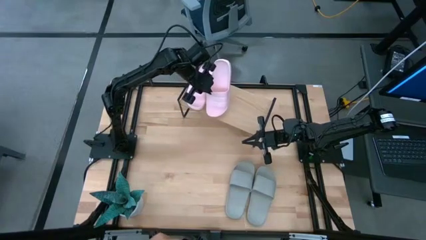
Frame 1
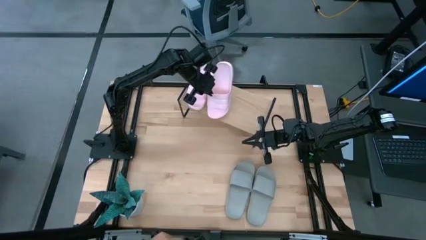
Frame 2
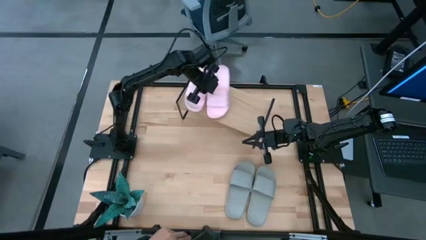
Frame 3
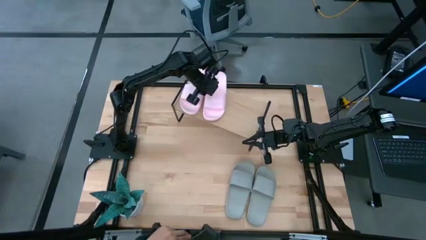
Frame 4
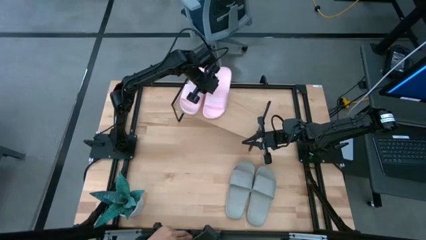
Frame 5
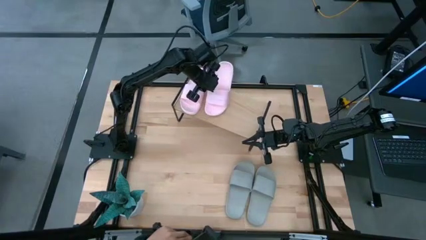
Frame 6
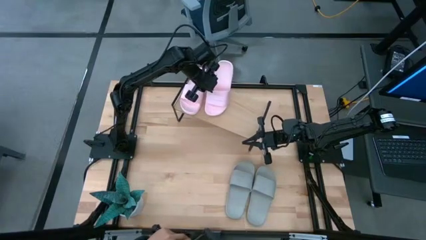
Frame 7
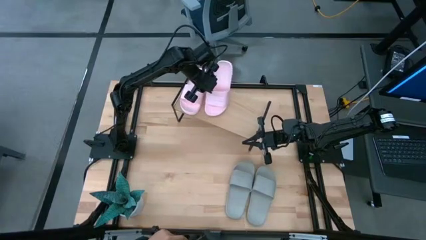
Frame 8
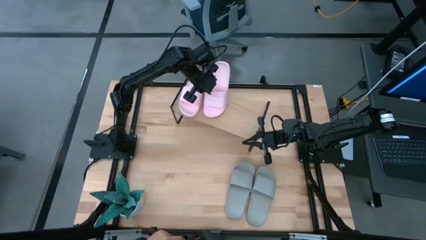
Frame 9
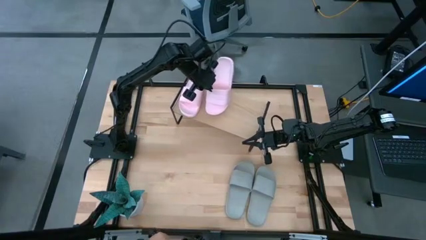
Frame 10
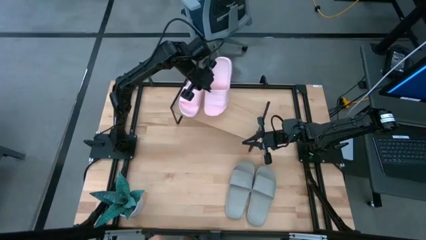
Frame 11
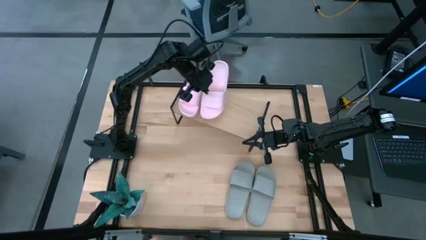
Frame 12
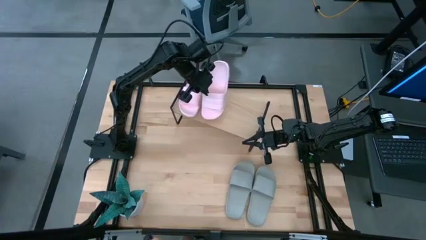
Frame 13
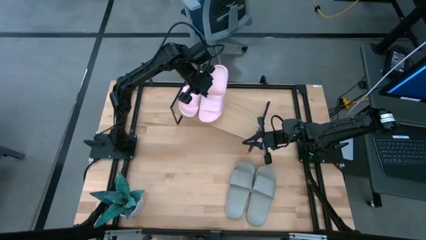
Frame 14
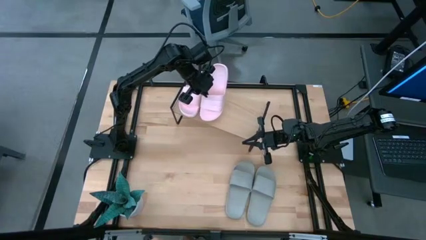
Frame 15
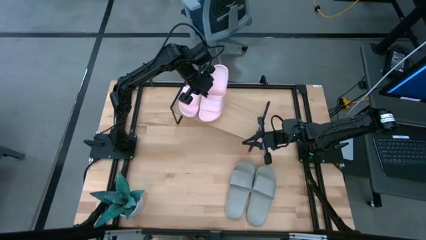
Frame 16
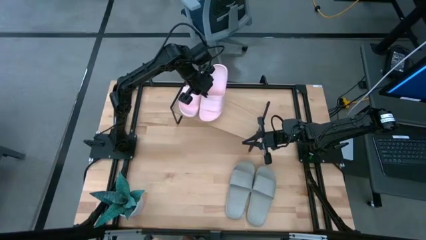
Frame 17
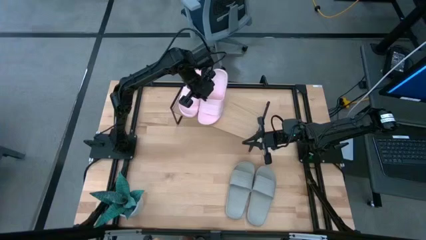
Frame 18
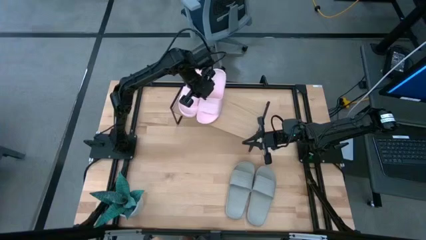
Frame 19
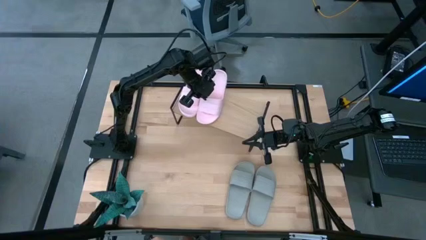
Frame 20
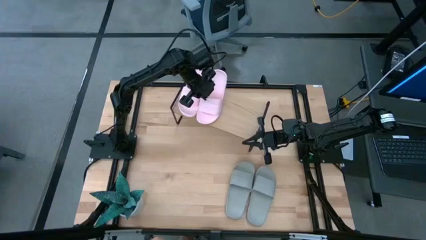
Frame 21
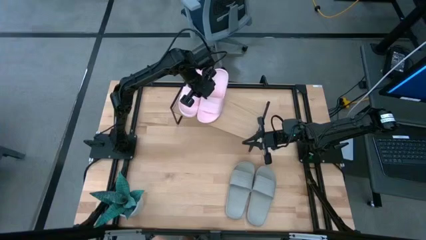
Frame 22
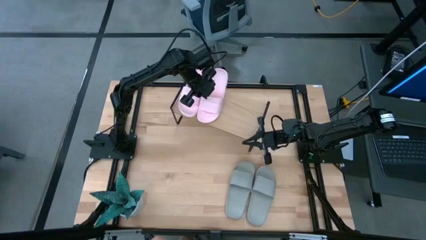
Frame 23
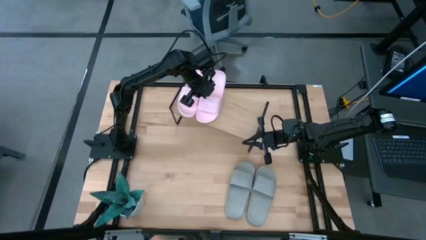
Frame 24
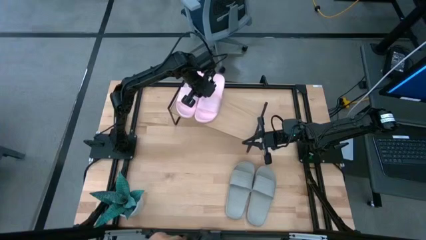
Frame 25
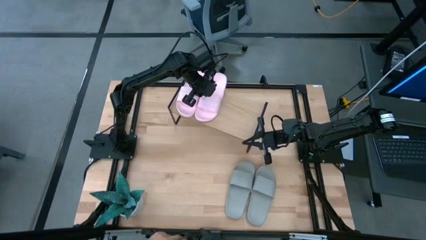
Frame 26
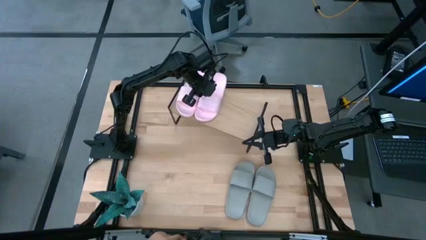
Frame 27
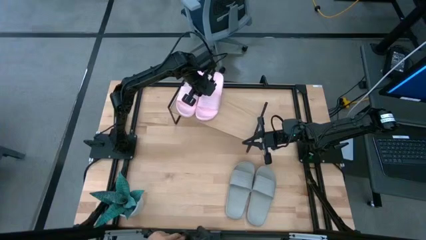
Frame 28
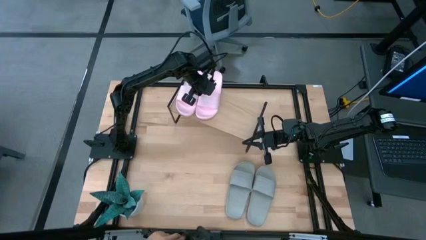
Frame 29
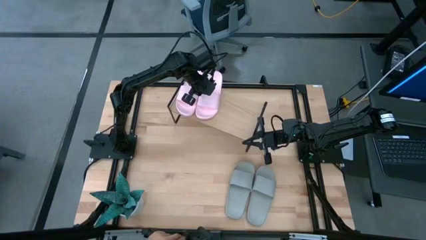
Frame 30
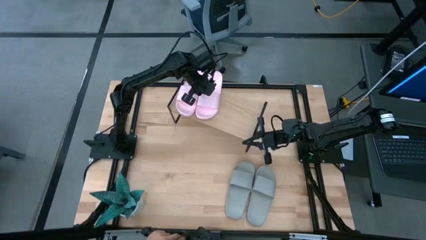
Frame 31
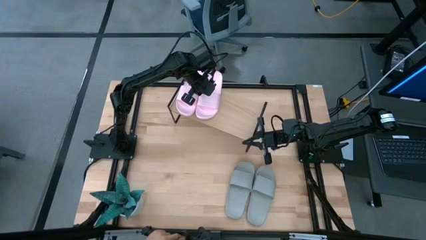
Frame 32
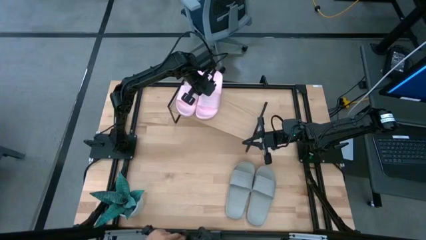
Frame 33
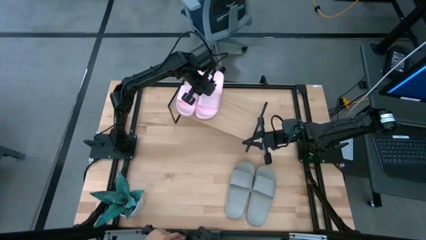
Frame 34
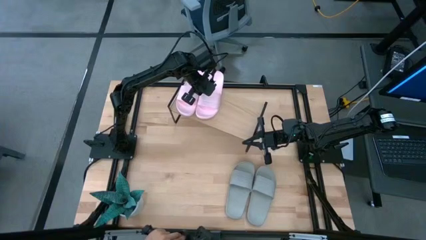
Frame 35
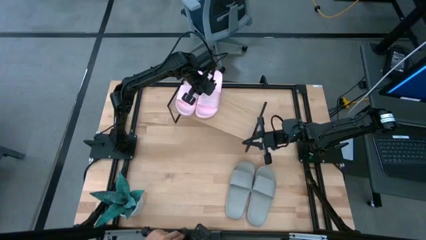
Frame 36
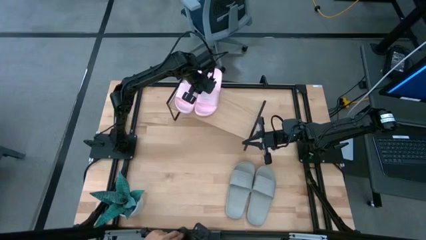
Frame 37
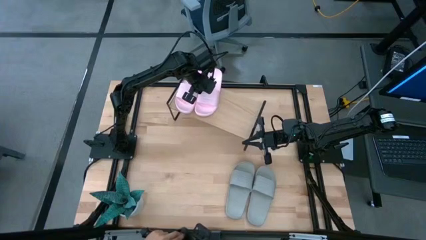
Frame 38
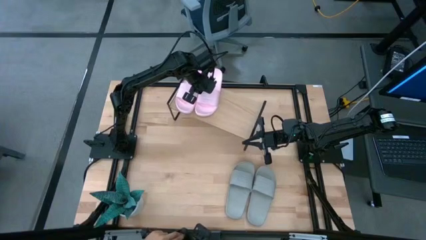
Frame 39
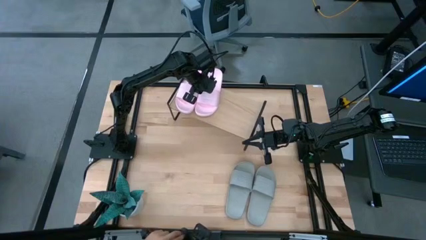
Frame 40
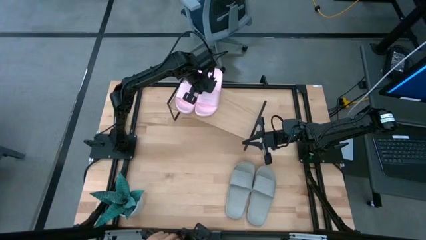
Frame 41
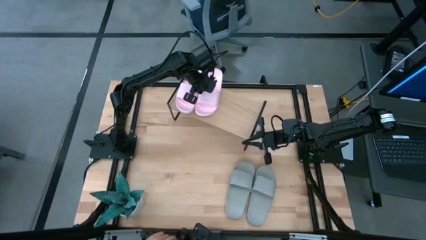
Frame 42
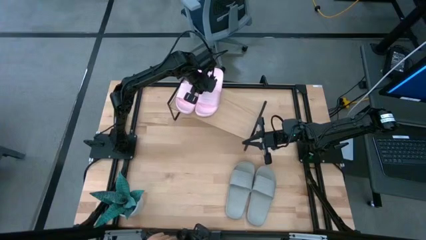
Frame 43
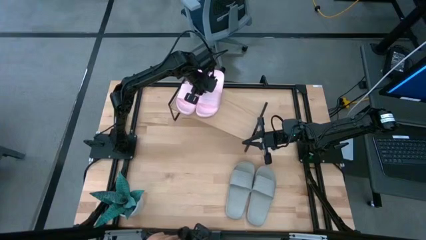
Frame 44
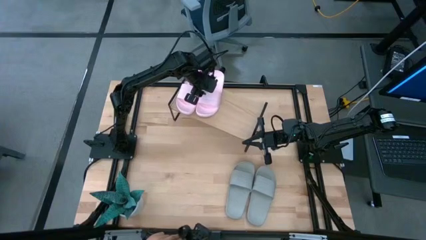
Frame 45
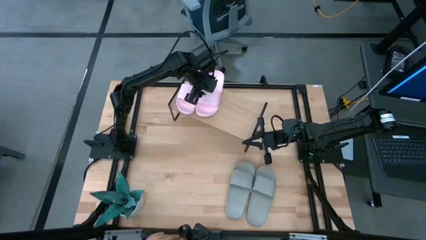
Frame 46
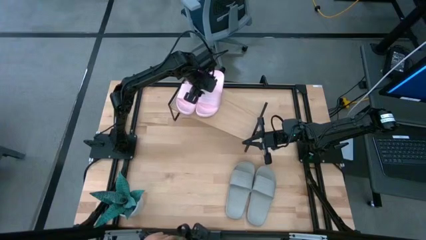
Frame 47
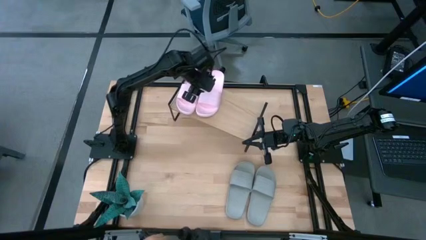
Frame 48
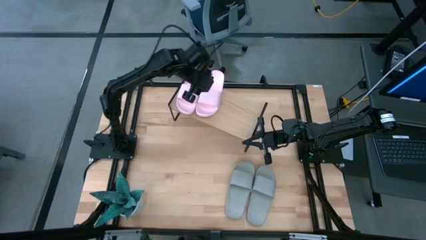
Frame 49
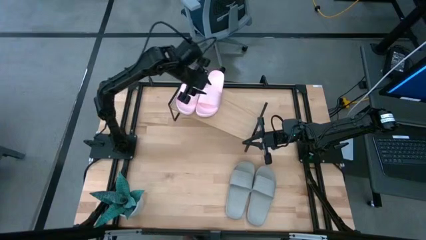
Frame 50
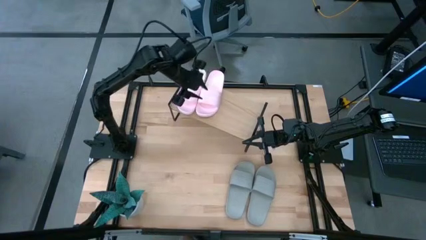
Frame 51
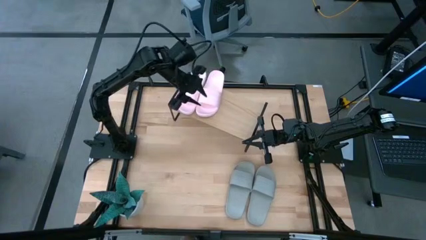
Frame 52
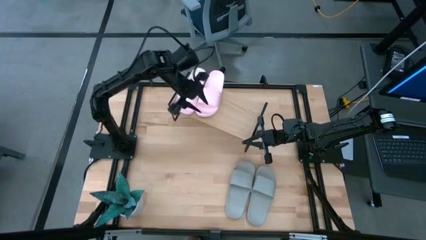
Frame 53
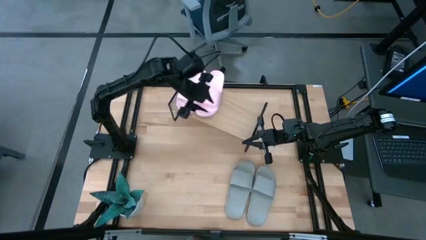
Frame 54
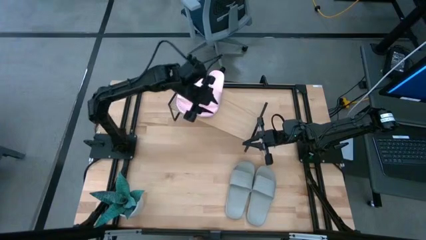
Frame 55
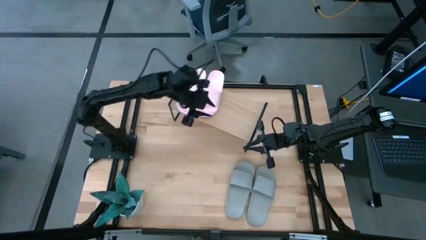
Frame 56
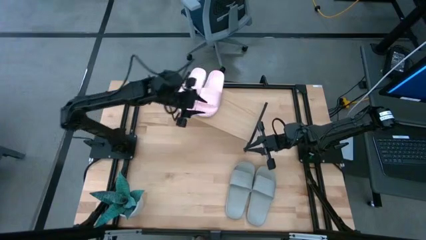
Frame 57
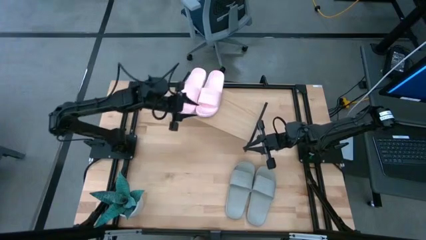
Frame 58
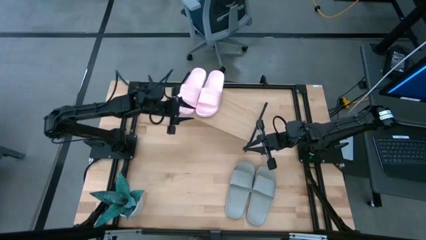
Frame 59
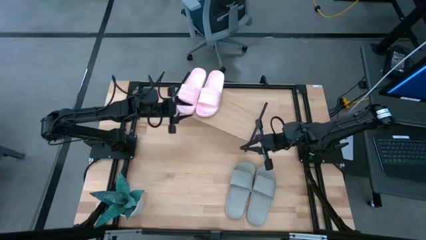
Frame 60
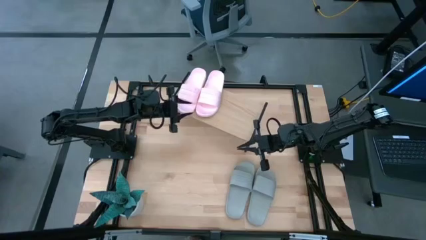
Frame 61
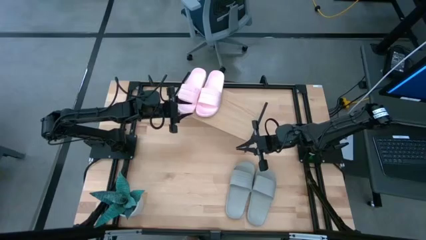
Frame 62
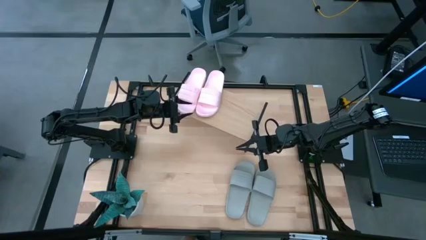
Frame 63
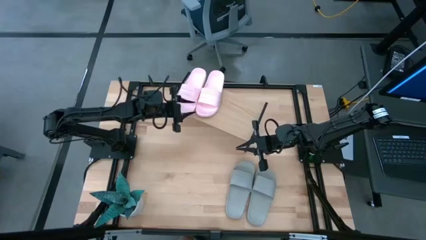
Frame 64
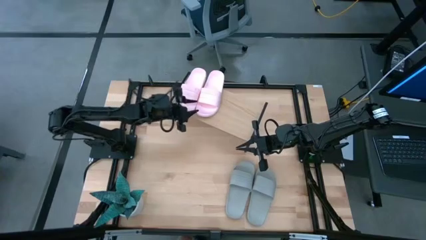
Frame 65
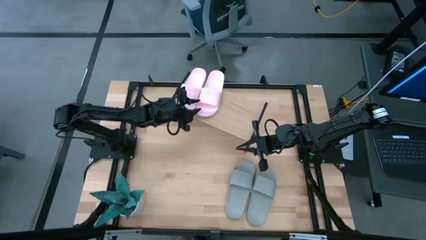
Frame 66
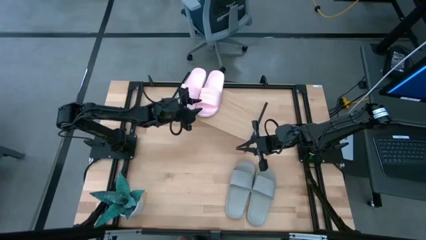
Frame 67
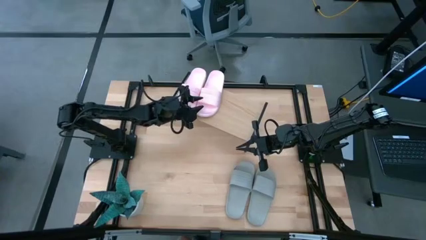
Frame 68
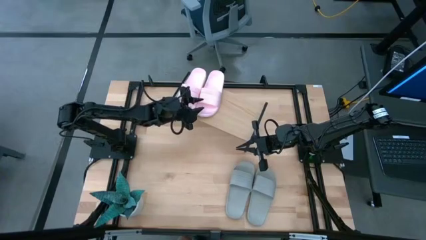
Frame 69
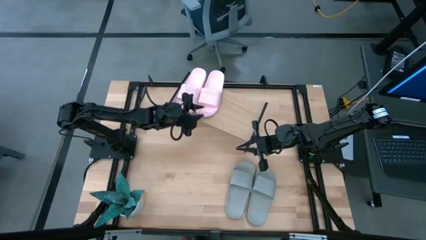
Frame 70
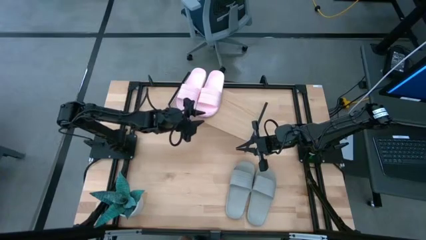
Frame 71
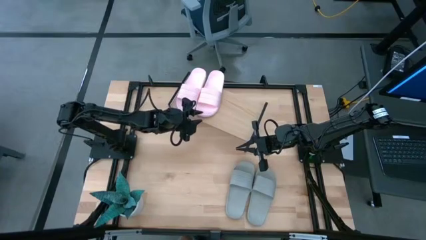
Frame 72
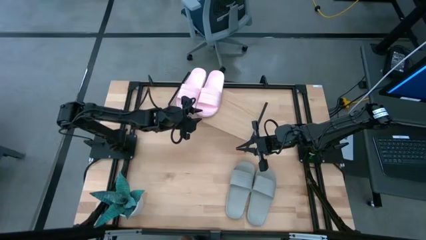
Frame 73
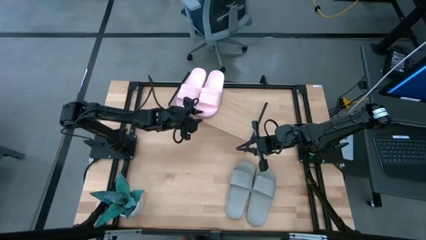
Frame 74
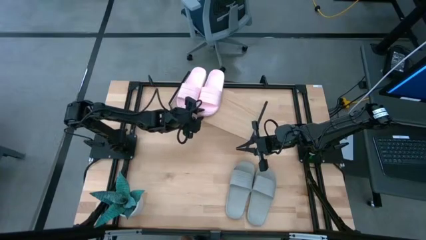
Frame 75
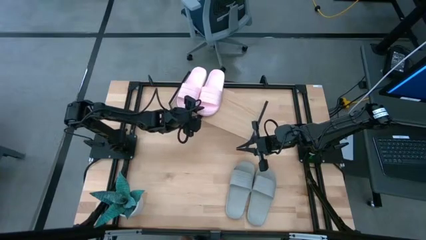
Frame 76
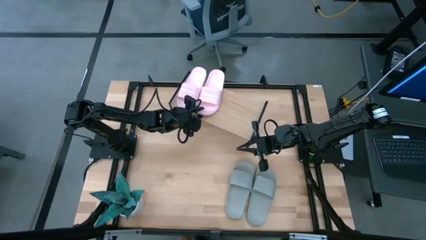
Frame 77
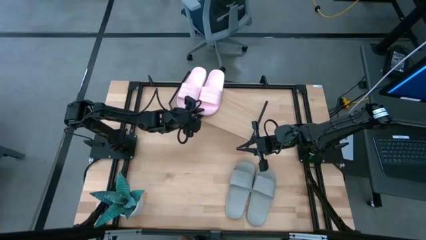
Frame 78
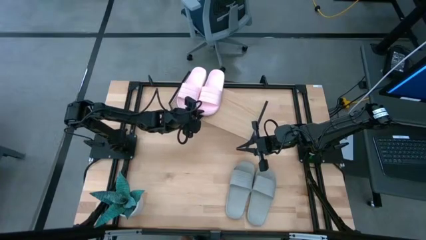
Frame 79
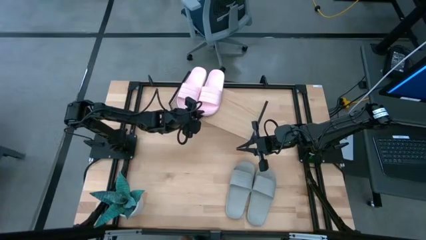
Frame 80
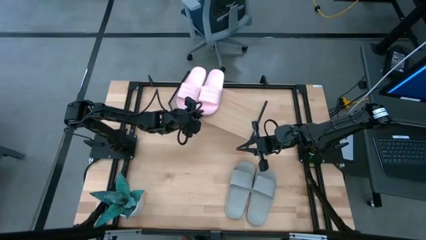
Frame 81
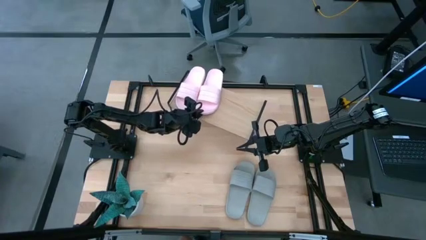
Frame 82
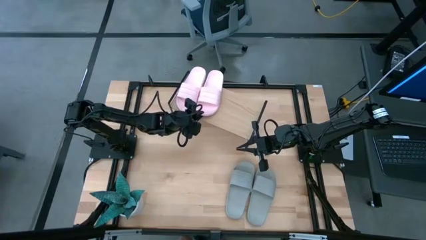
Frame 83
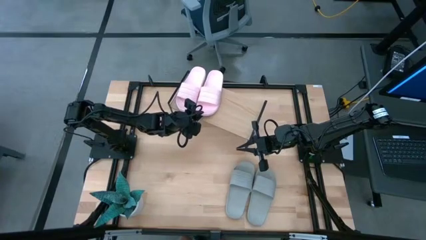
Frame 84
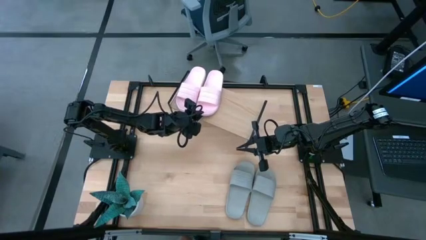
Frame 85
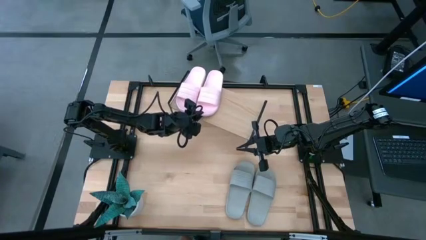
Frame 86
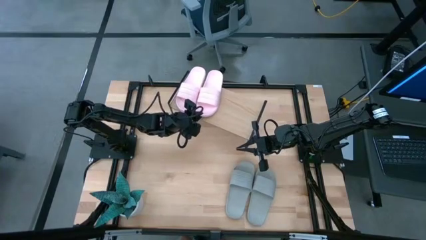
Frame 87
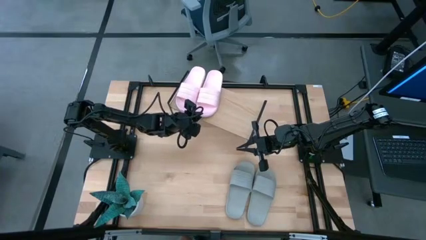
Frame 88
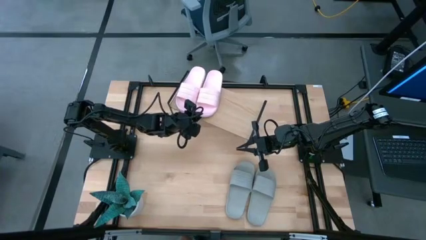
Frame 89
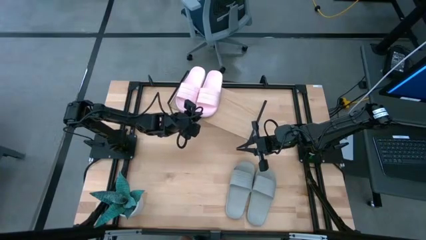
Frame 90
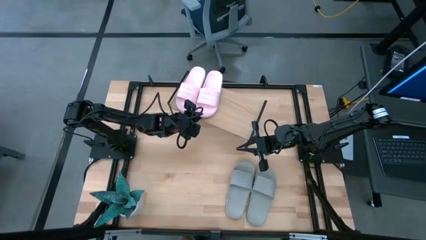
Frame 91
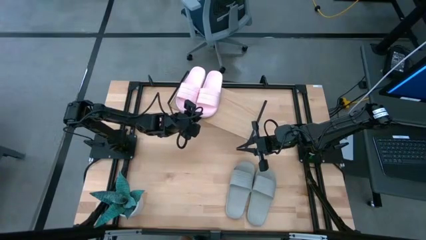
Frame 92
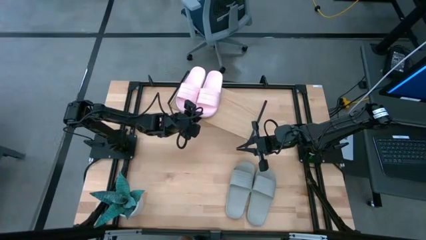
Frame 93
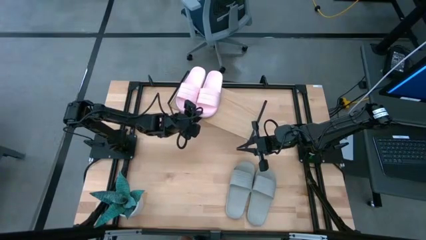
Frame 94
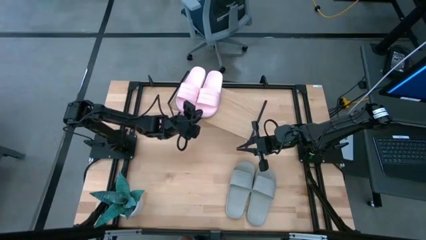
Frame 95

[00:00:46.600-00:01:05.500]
Task: Pick and place slides into the shelf
Put the pink slide on the shelf
